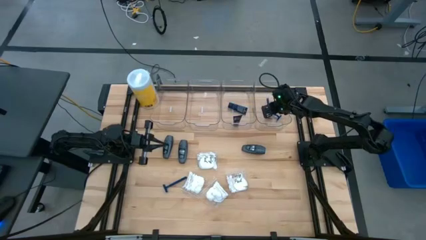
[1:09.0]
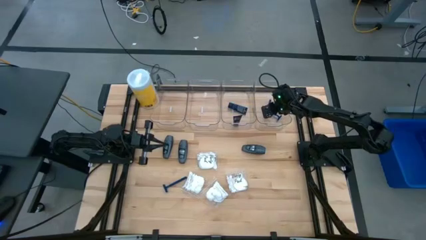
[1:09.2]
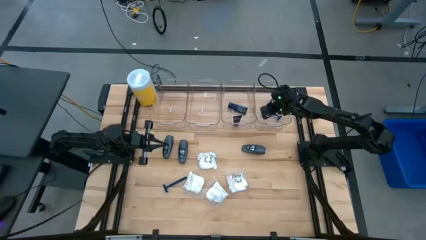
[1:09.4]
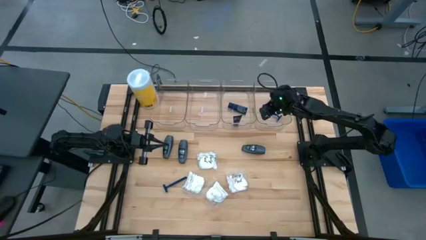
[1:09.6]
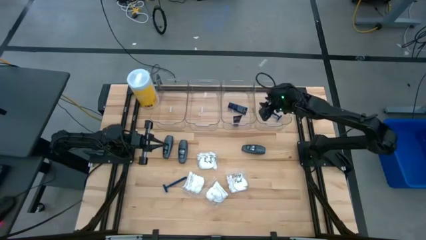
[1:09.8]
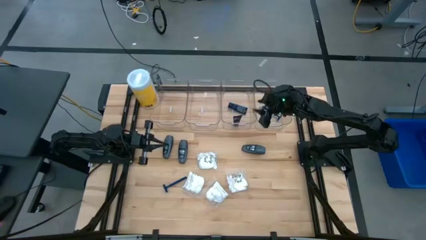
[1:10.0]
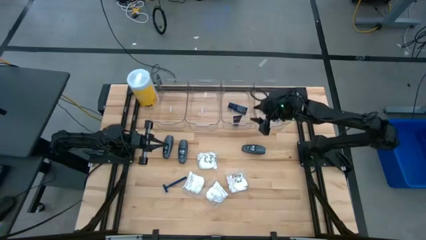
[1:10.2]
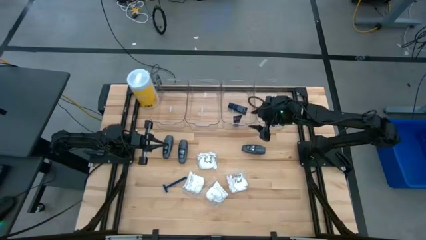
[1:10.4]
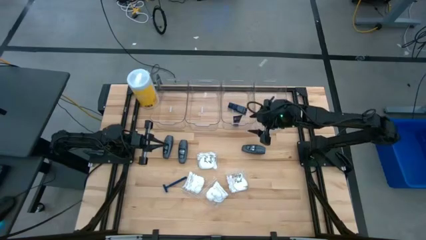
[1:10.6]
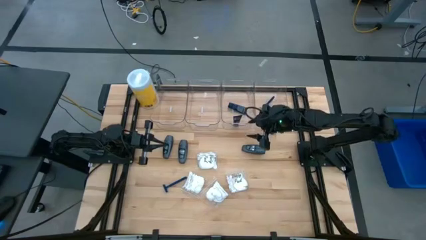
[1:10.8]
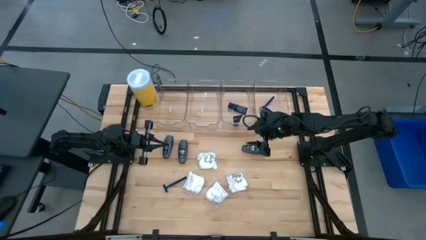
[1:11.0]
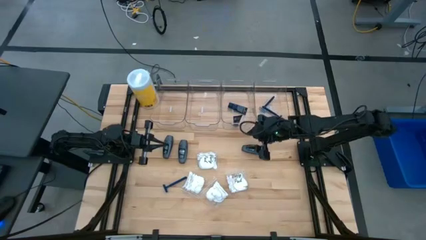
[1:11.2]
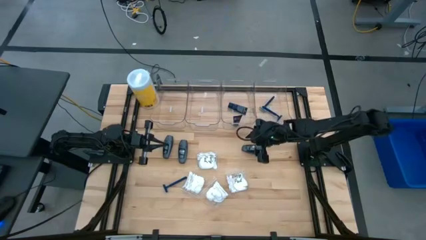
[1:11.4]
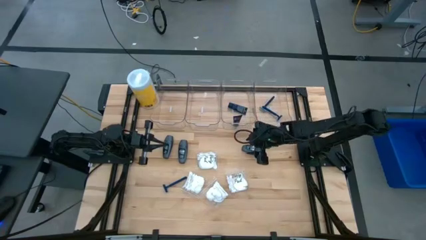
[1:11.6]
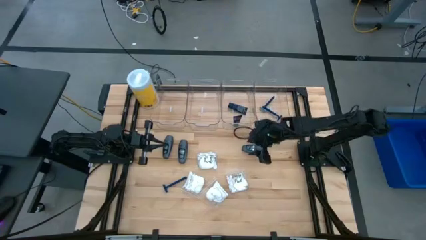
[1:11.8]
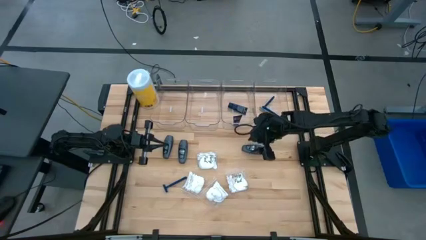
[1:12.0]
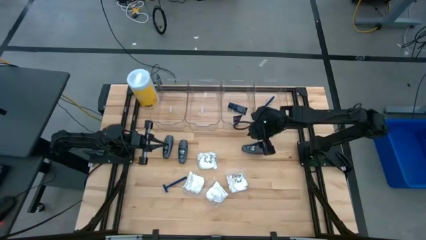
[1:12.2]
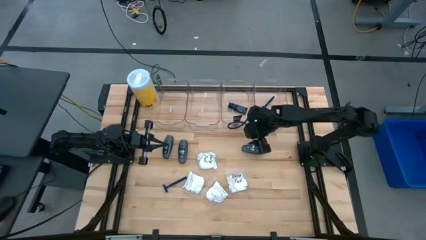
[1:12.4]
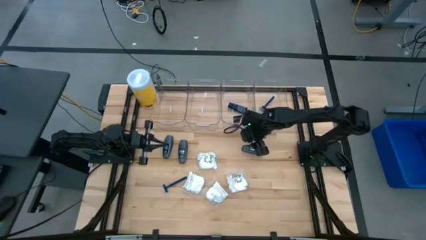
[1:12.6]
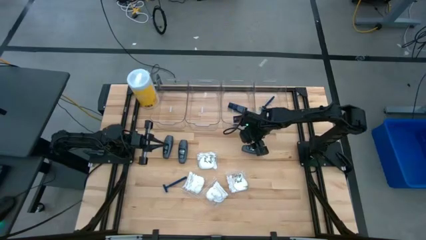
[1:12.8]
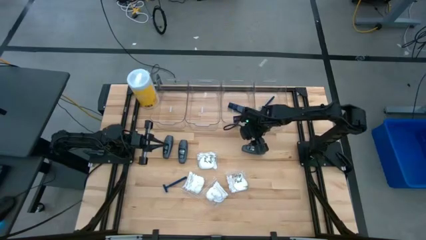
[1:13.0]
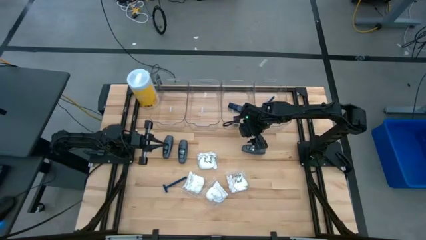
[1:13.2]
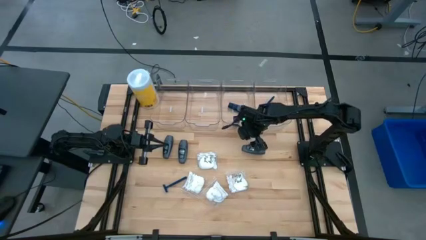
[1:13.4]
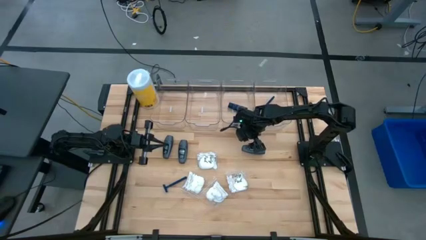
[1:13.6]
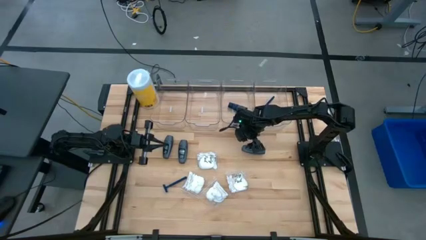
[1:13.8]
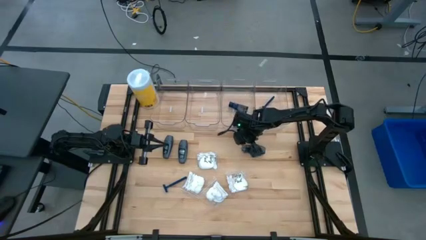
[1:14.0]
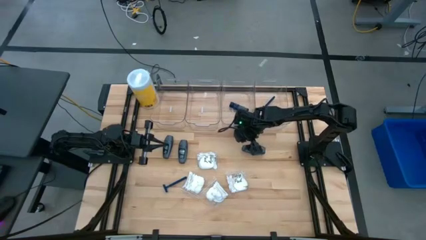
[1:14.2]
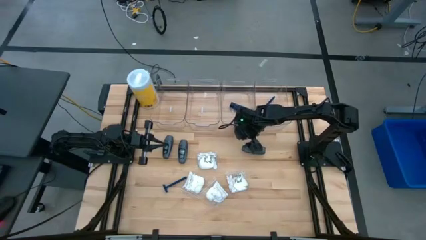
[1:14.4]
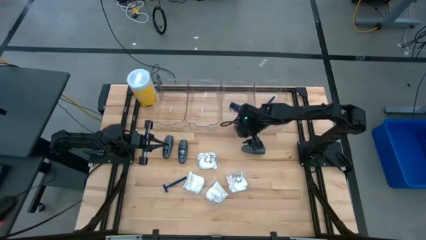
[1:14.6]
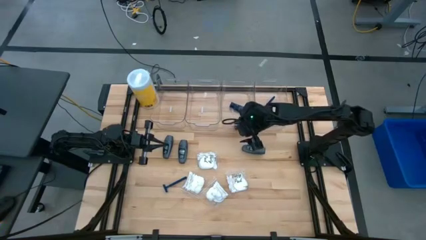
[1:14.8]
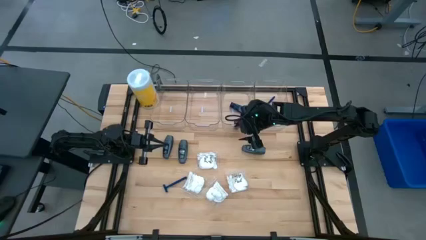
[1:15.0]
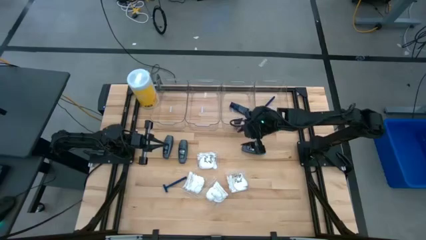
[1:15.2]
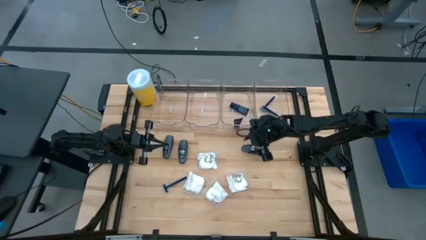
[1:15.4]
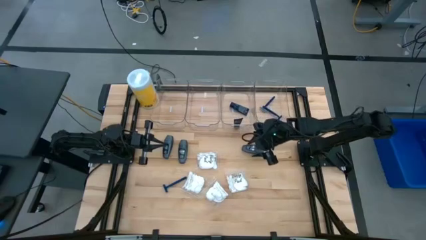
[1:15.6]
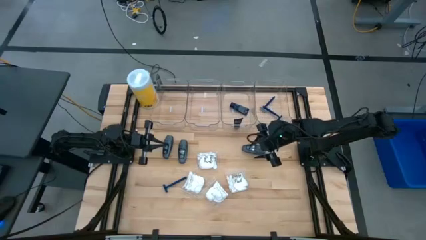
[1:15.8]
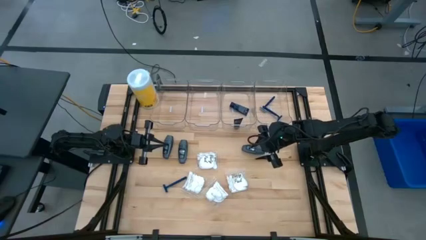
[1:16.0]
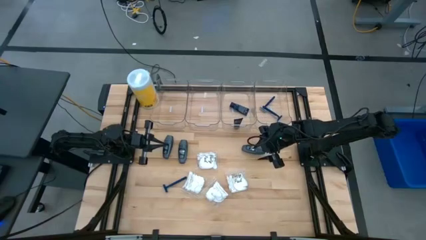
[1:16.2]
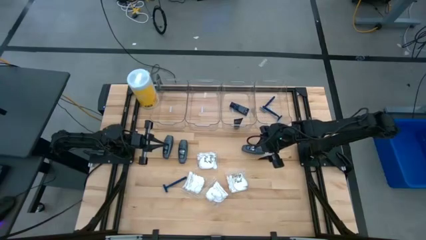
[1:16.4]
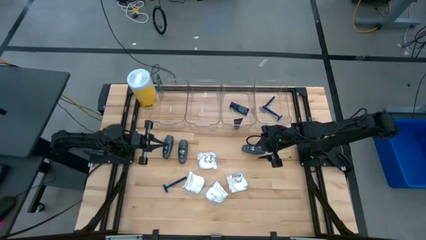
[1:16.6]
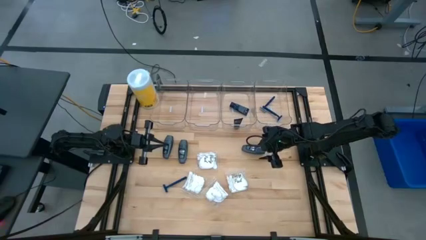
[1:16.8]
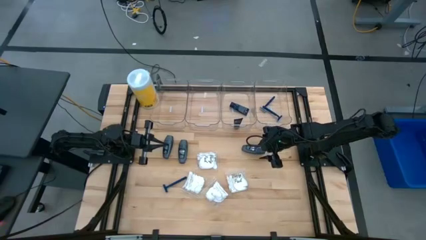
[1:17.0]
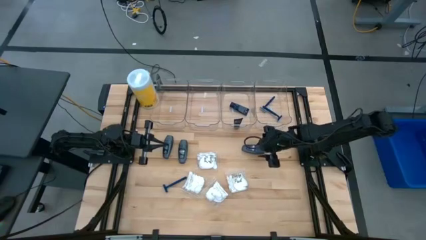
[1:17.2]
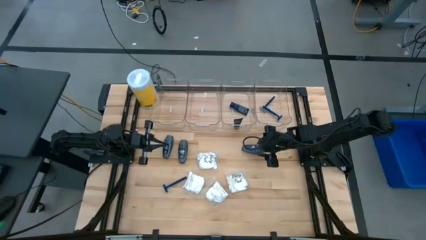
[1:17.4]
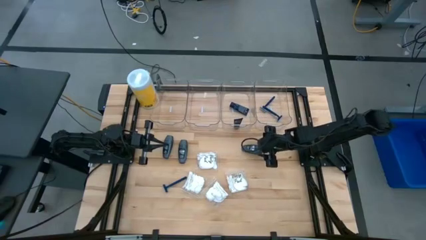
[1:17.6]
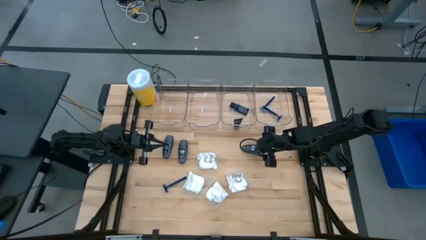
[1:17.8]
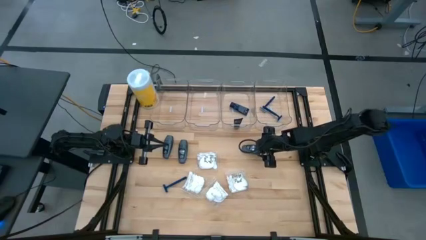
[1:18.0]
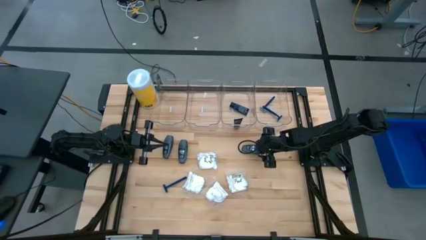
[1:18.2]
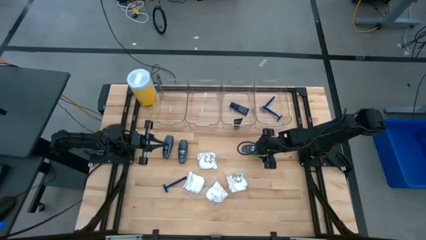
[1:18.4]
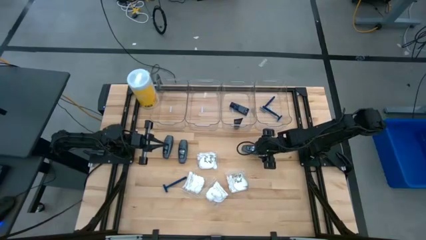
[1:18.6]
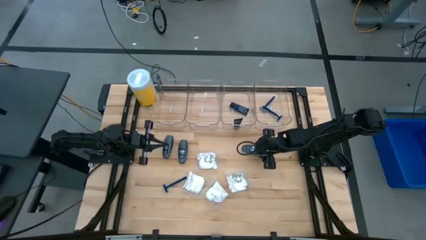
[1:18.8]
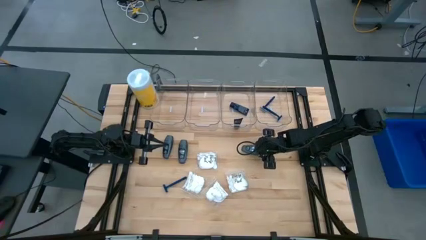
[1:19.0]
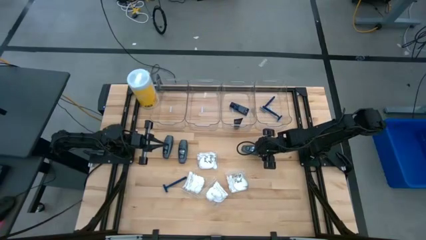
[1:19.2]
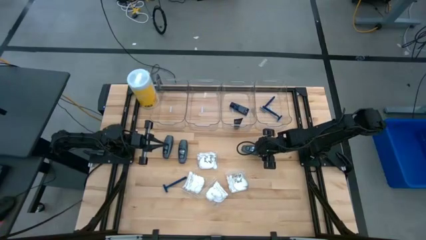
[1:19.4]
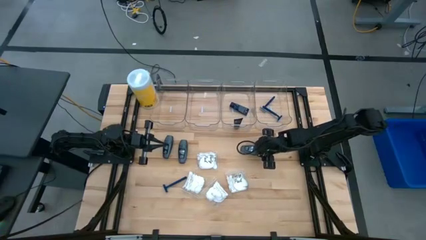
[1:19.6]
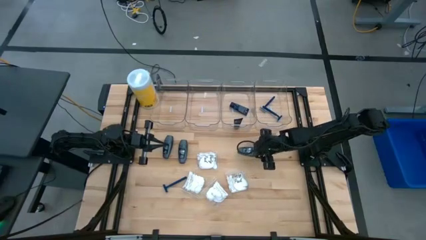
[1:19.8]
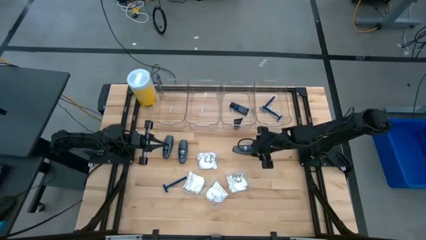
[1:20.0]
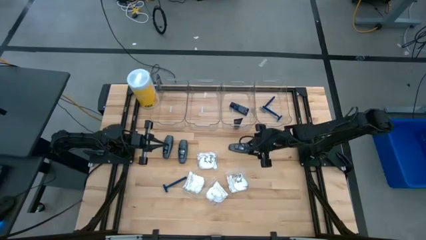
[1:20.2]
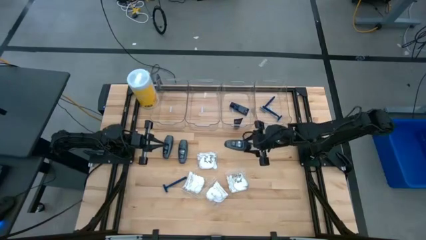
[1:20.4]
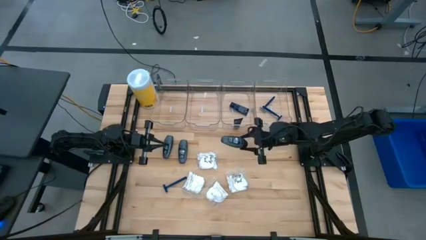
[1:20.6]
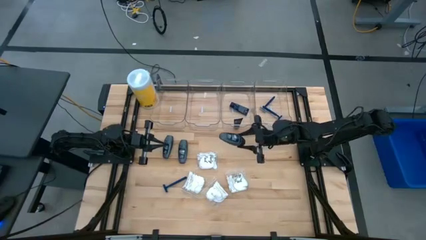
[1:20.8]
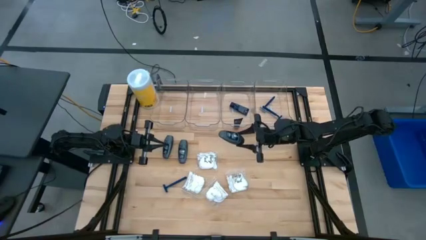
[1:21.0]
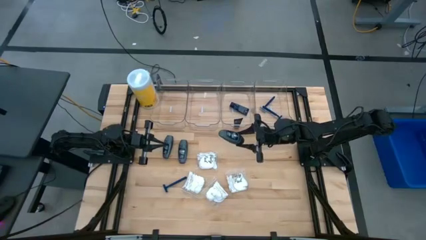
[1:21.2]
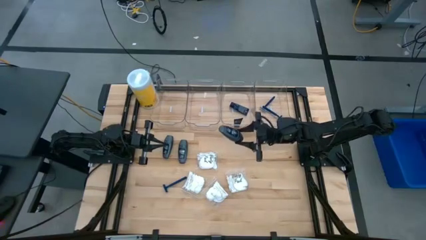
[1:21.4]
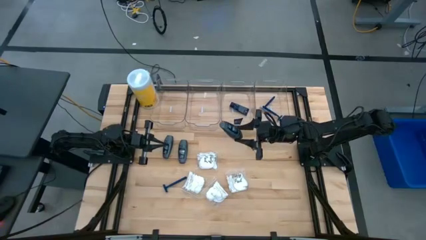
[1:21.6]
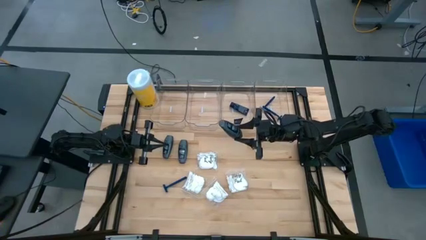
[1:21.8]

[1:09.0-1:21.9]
Task: Pick & Place Travel size toiletries
Put the black deodorant into the middle left transparent bin

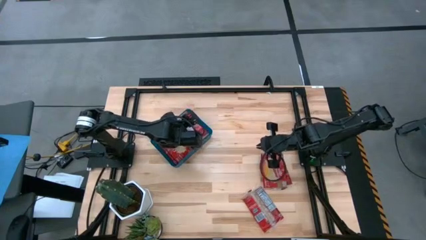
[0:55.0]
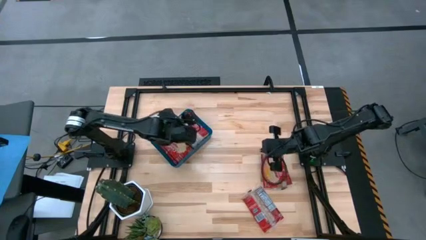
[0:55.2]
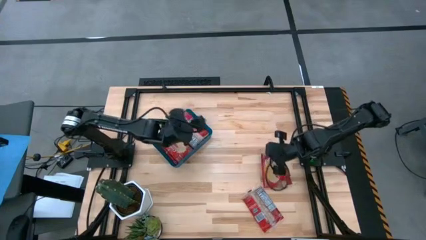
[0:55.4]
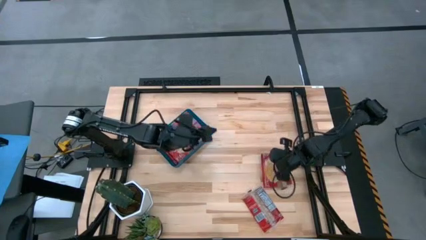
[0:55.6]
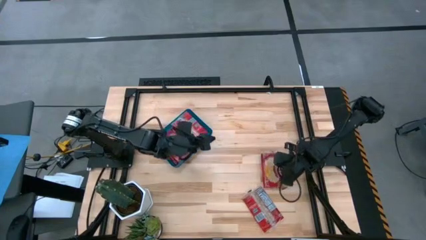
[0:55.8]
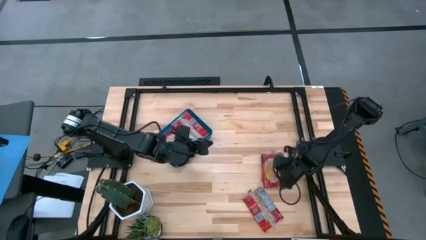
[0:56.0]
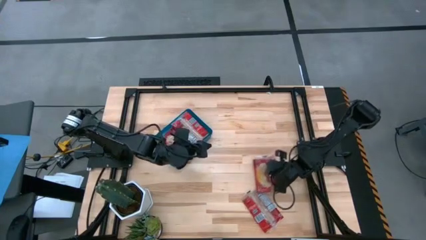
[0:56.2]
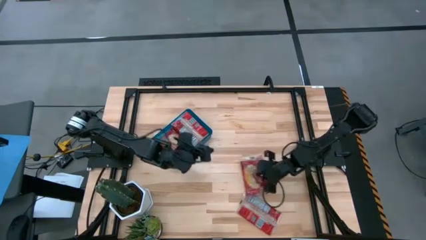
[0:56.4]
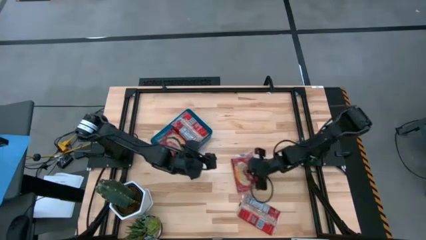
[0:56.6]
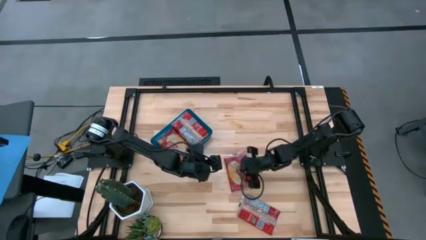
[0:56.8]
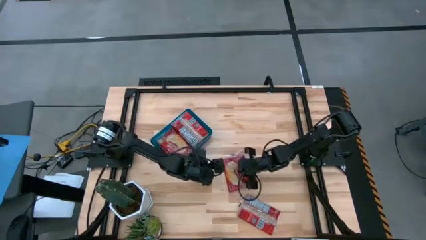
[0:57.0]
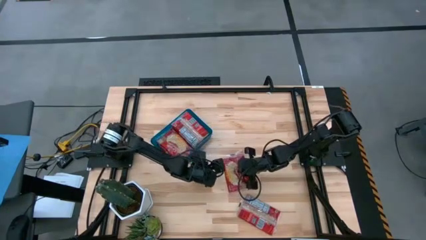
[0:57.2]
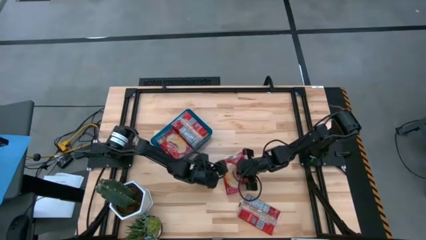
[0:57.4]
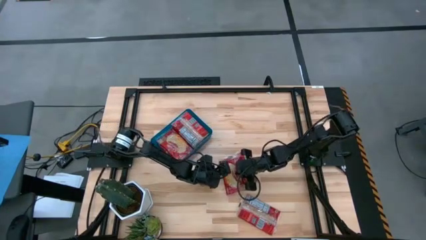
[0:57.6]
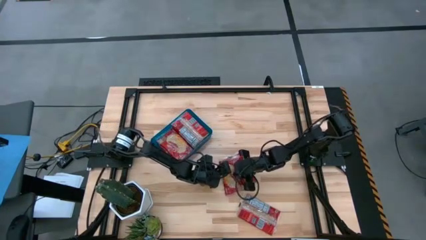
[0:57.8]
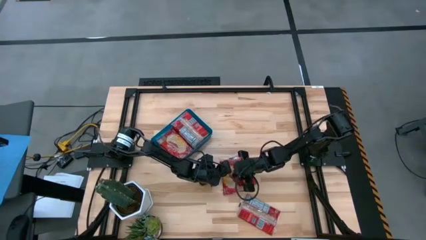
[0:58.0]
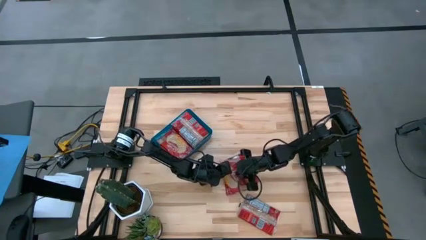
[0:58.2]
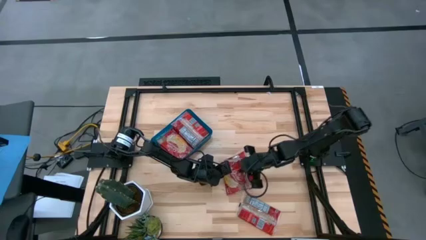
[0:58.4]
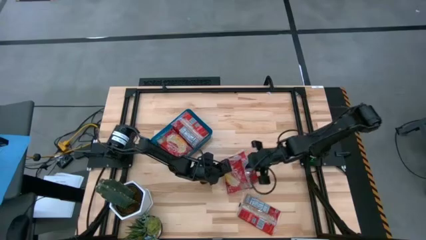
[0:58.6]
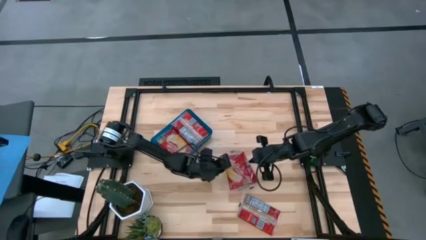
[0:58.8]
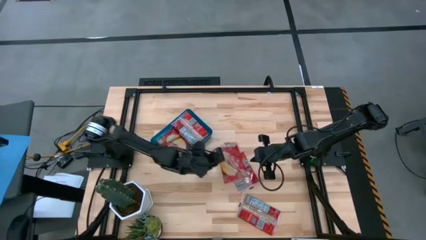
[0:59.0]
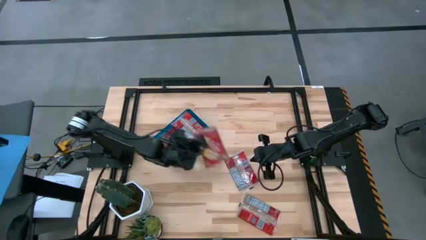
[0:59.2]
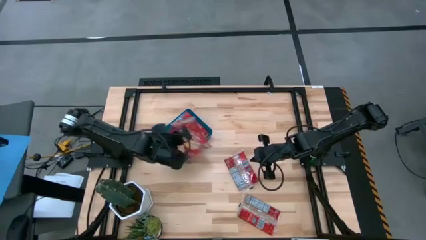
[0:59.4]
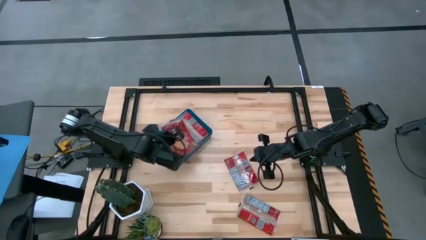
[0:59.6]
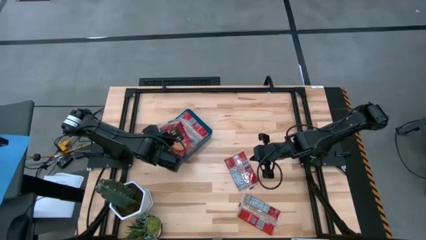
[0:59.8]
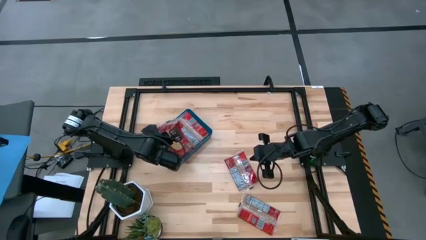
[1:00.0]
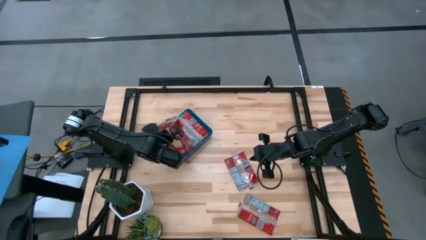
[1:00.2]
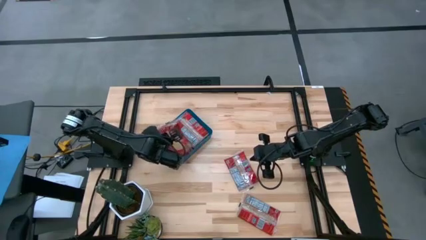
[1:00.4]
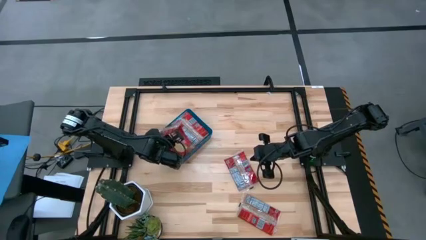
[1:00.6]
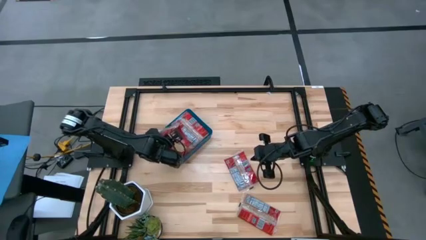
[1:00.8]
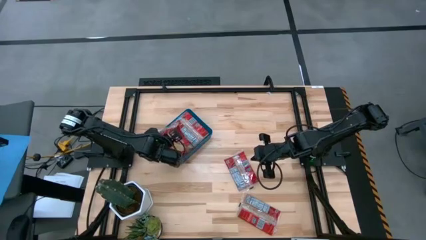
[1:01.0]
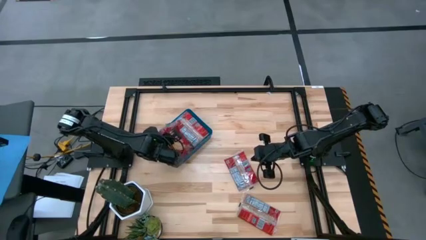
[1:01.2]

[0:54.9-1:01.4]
Task: Sort popcorn bags into baskets
Put the red popcorn bag into the blue bin
